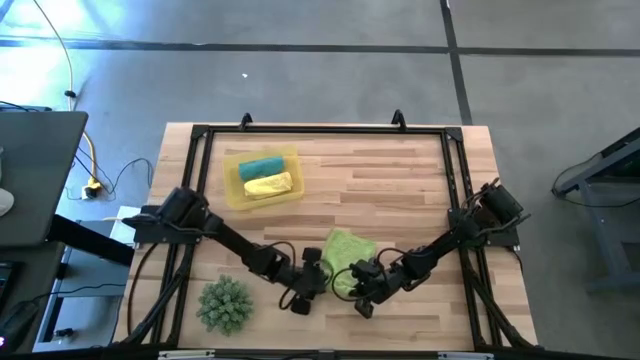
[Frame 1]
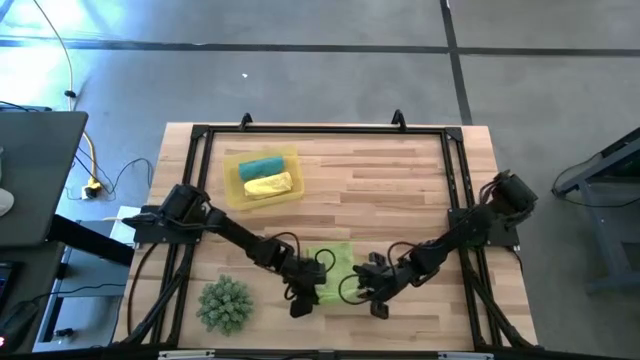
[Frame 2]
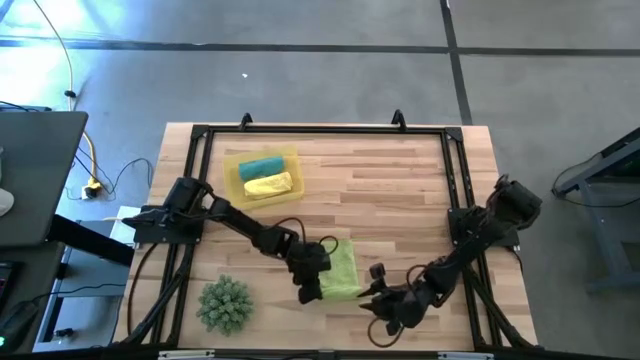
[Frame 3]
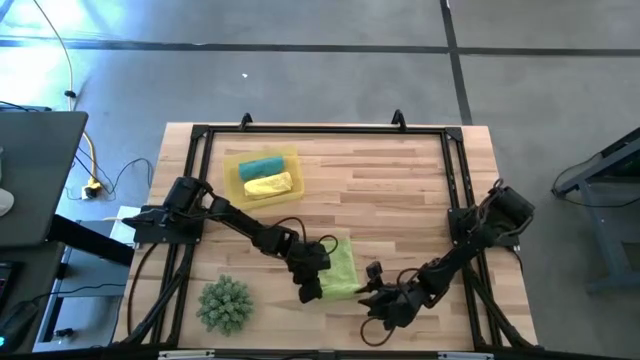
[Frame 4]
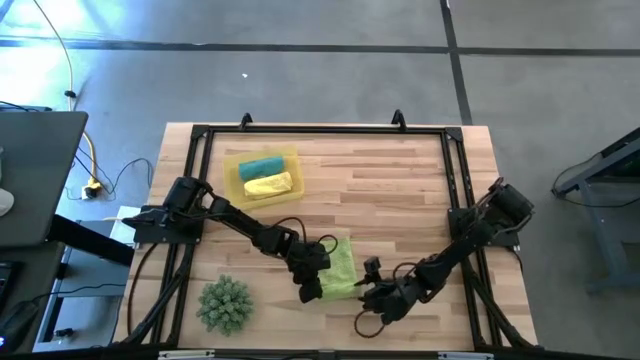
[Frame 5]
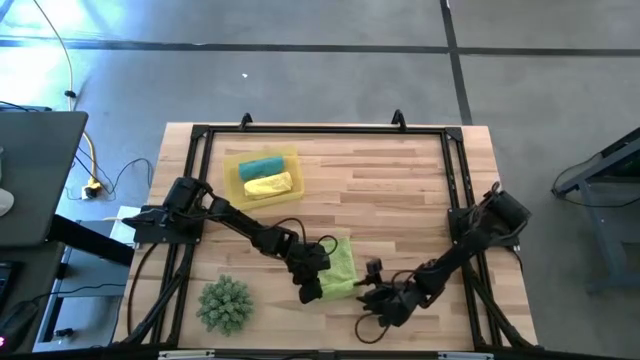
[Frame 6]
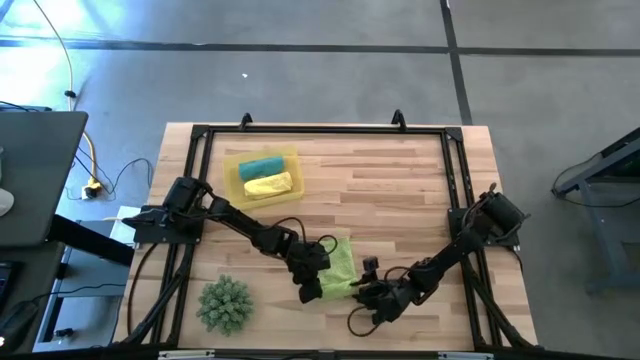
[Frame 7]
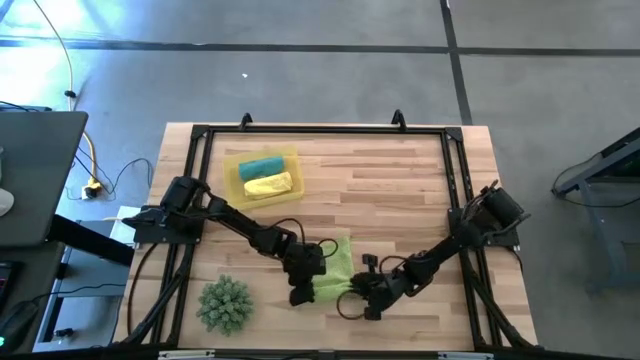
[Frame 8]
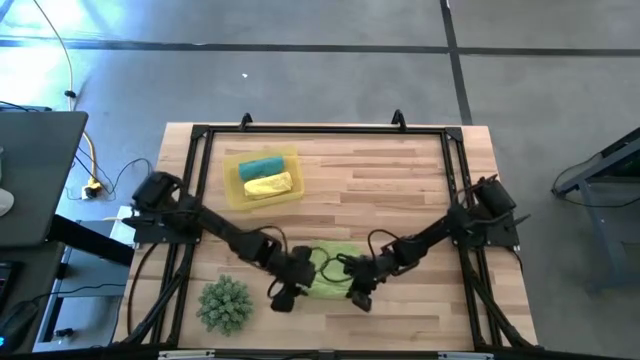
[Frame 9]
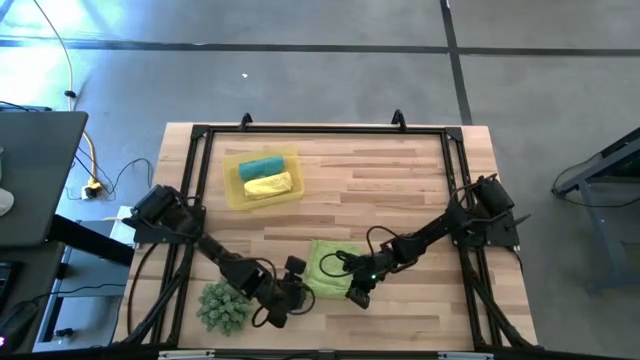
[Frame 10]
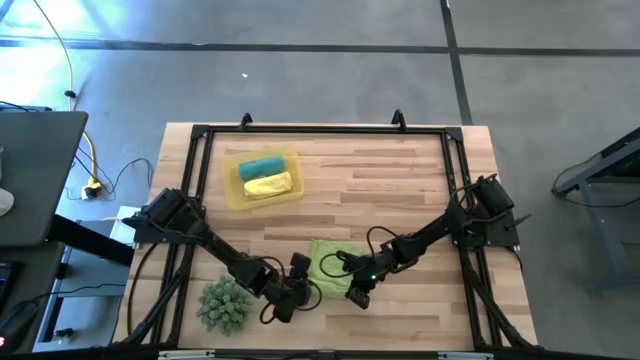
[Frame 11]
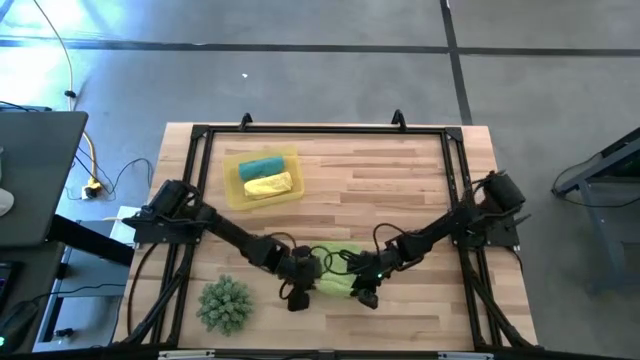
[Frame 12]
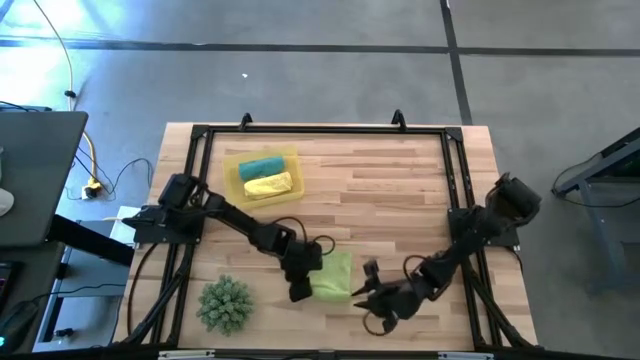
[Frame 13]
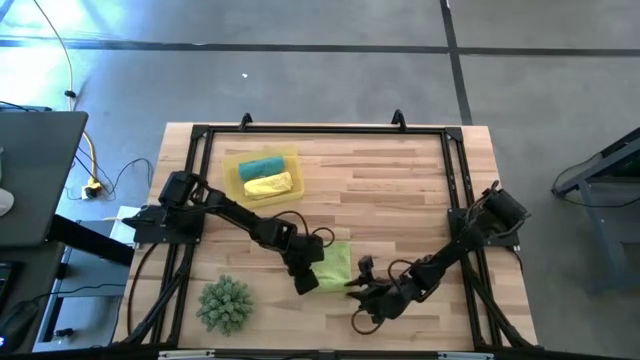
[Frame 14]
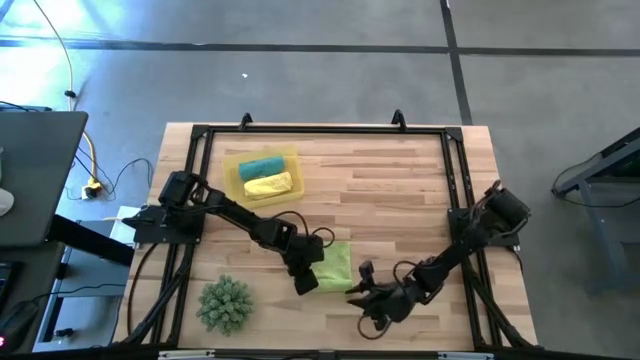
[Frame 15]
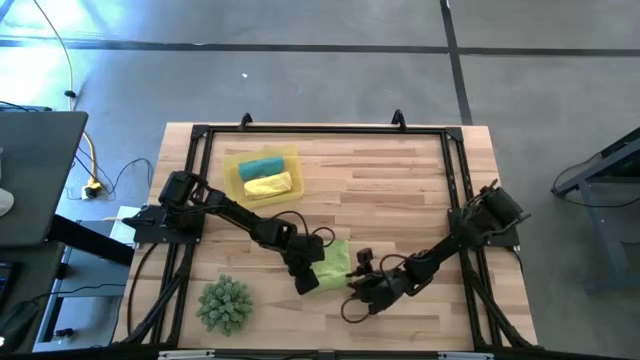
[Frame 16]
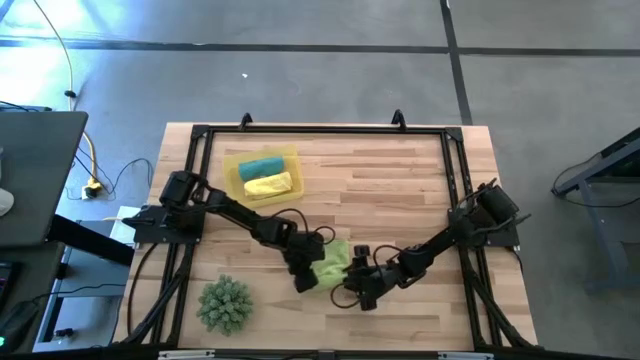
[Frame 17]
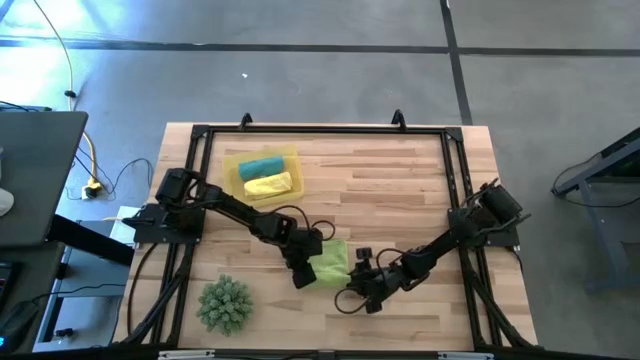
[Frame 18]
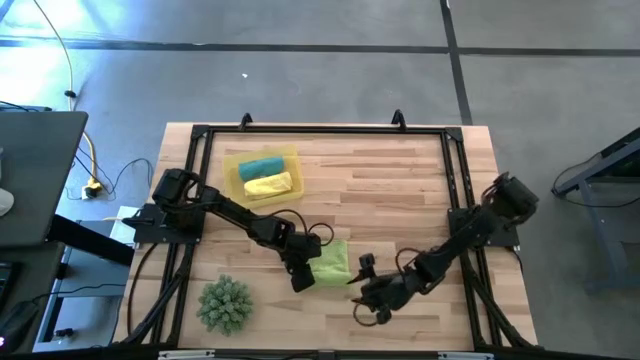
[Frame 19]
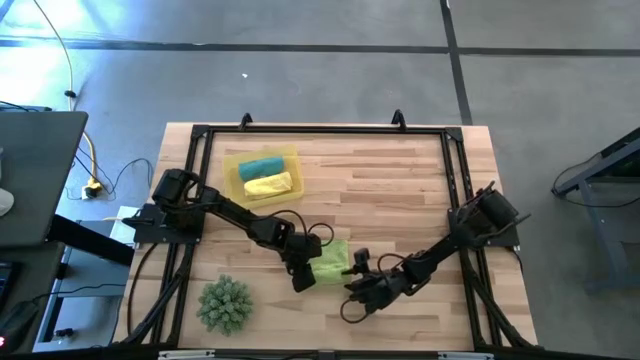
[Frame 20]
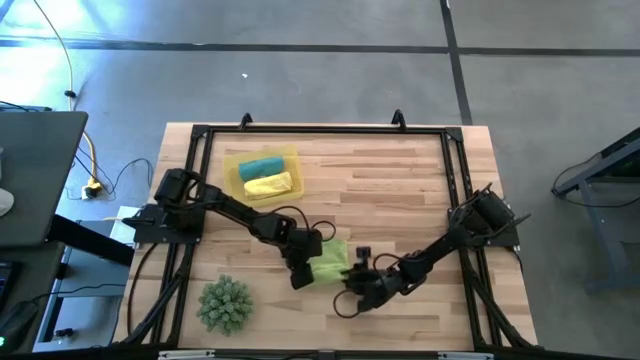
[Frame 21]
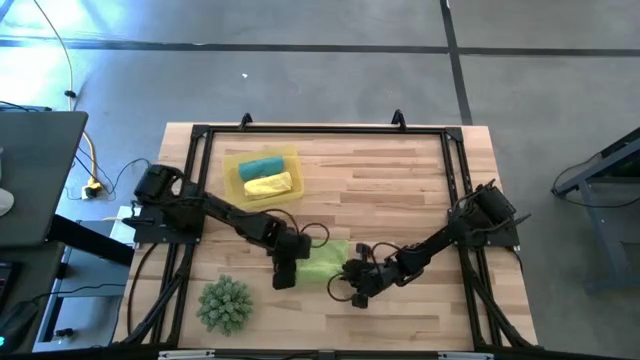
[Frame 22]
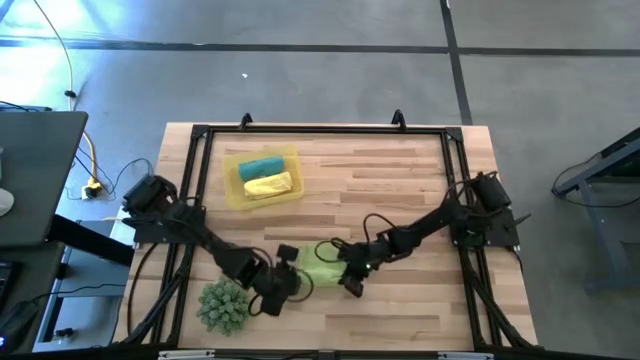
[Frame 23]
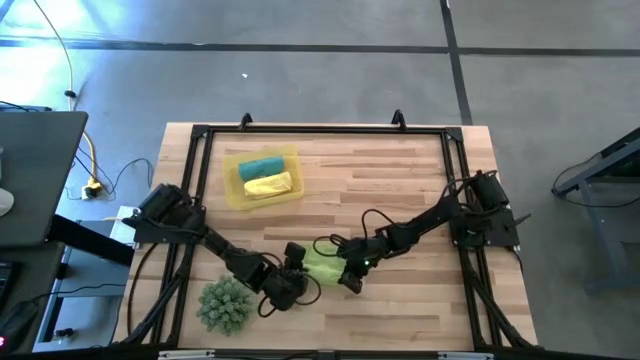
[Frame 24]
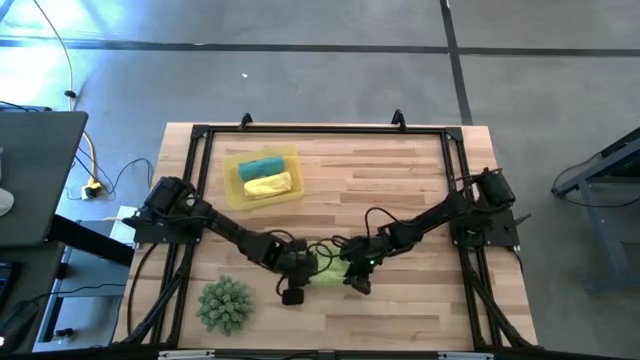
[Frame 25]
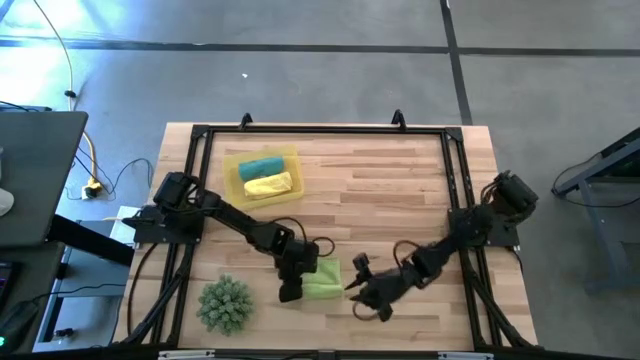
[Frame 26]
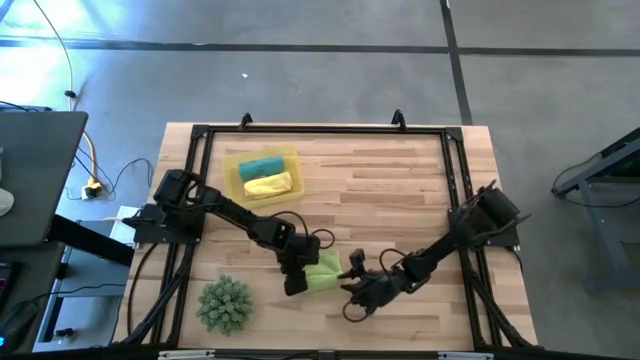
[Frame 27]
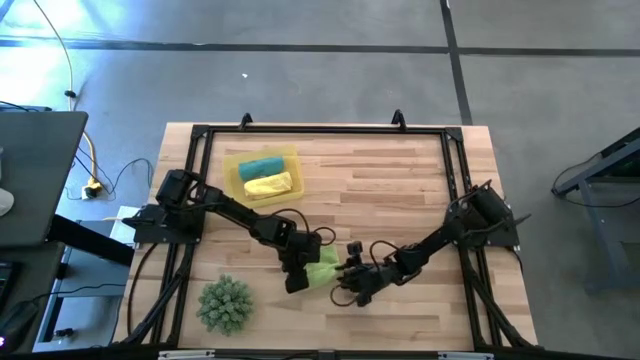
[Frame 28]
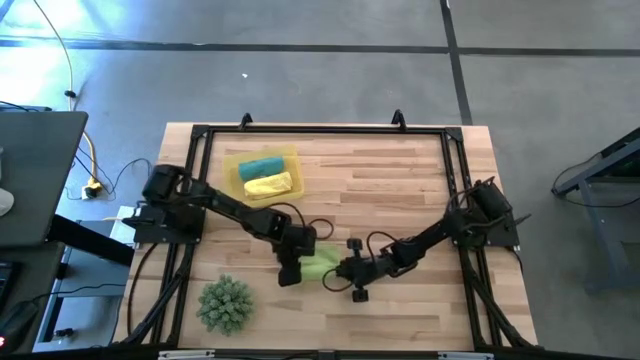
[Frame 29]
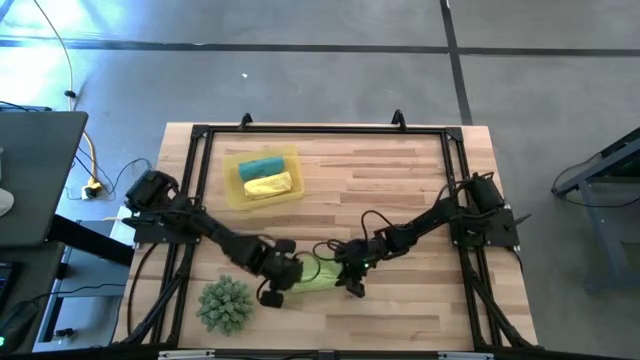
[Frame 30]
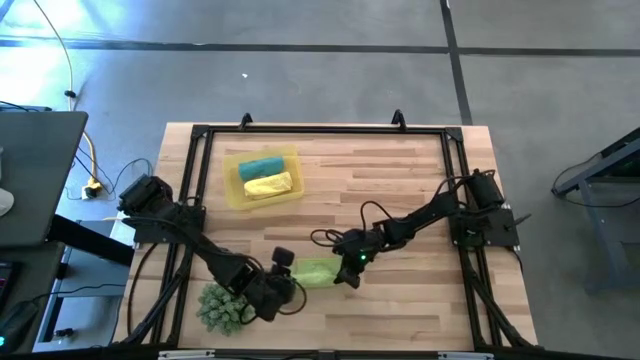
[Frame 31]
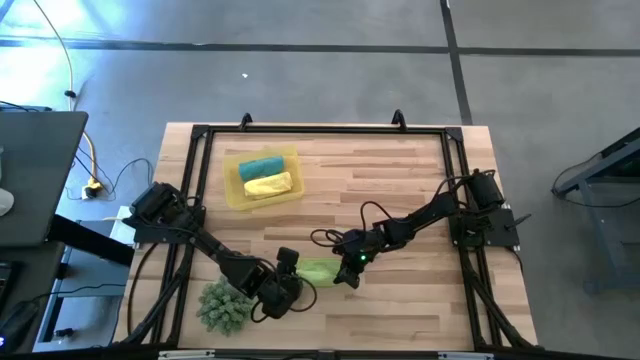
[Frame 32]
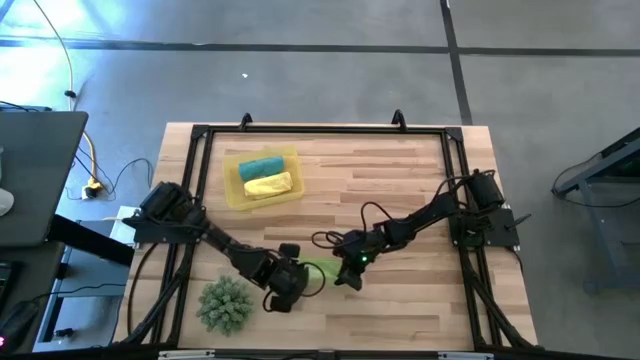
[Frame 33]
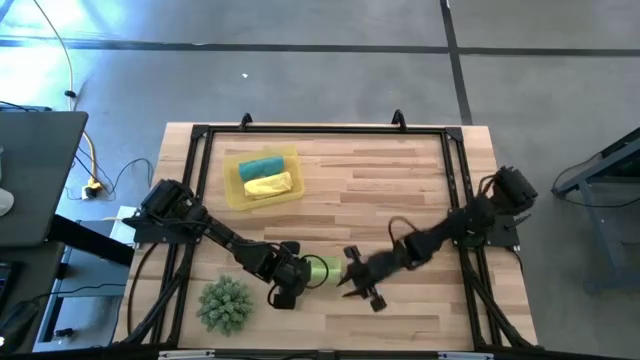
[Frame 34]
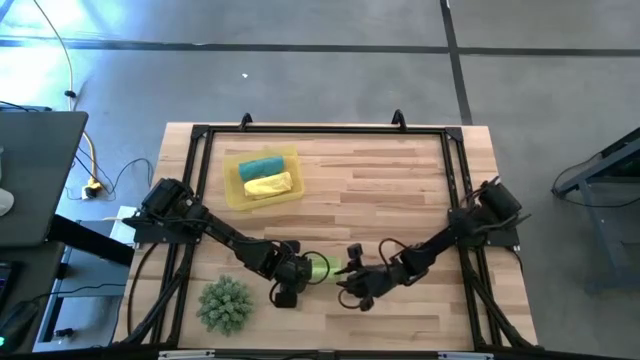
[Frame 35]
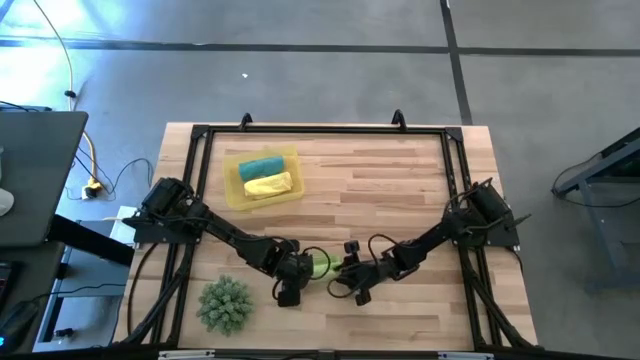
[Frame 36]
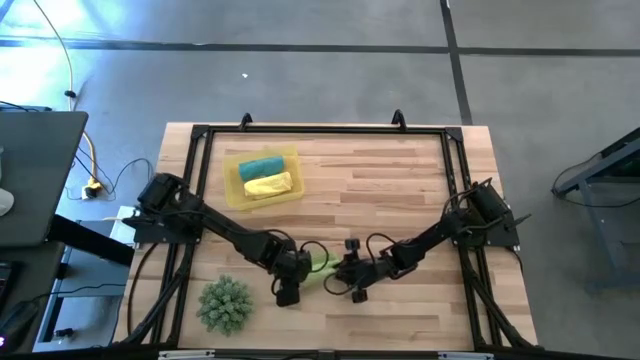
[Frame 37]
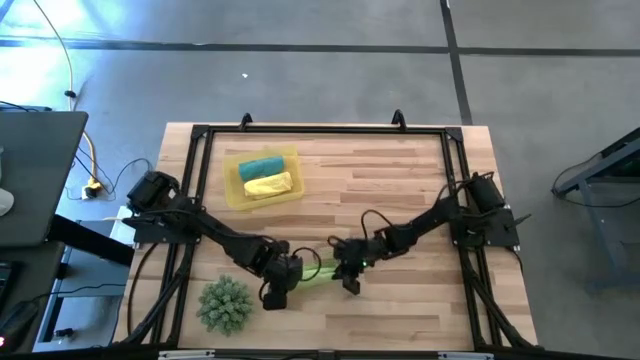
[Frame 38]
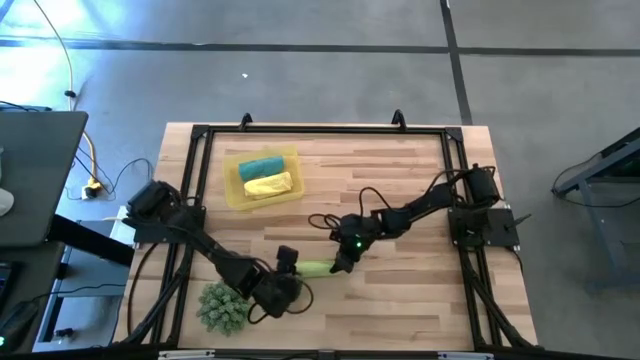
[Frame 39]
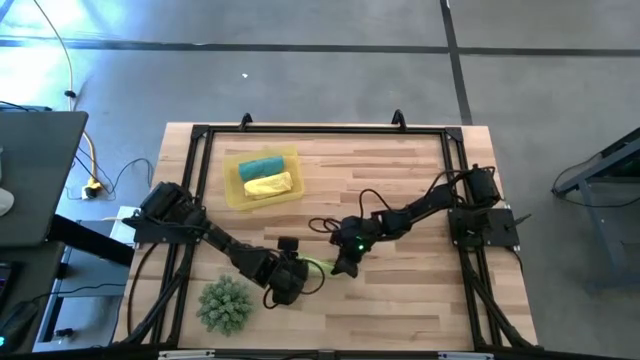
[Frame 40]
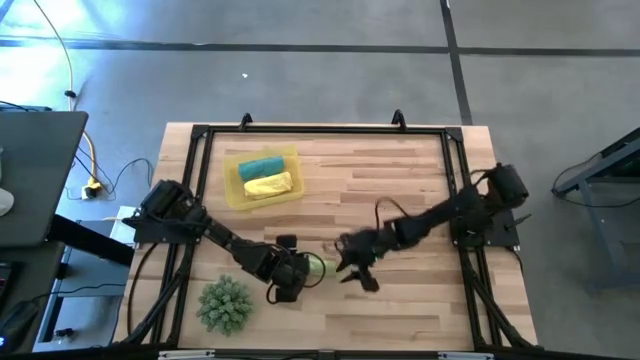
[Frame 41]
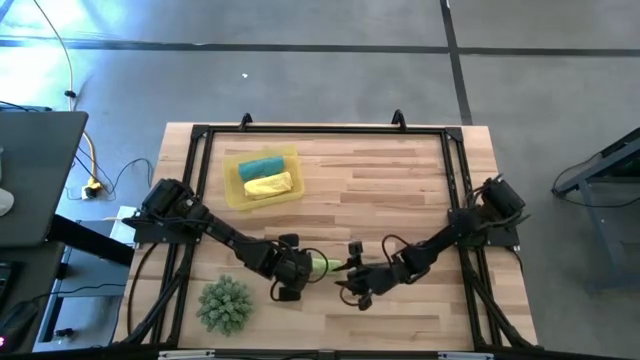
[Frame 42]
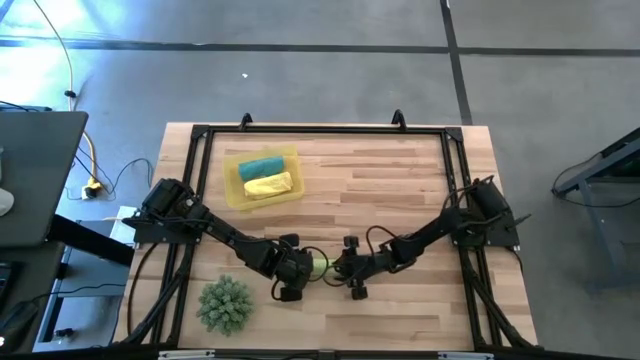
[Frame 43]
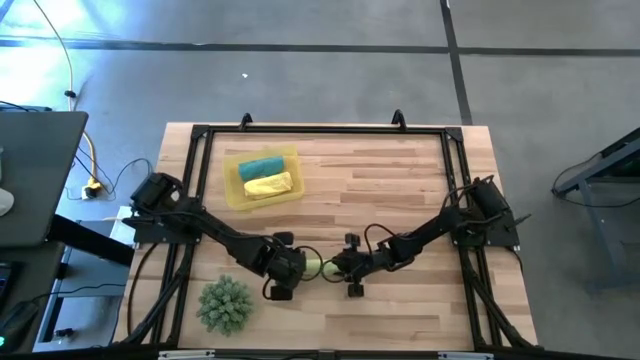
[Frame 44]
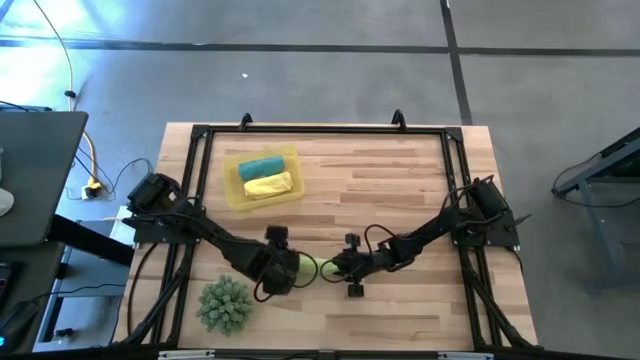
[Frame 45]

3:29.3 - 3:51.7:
Task: Roll microfiber towels into tight, uniform cylinder then place into a basket
Roll the green microfiber towel
